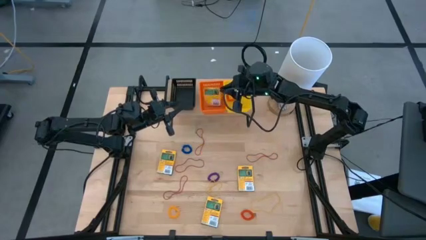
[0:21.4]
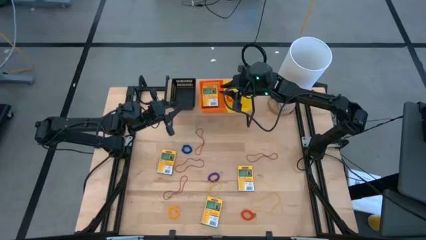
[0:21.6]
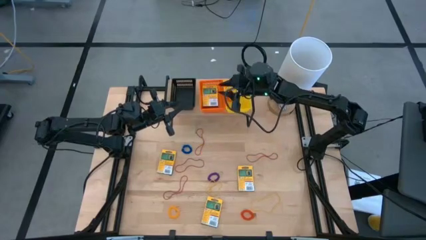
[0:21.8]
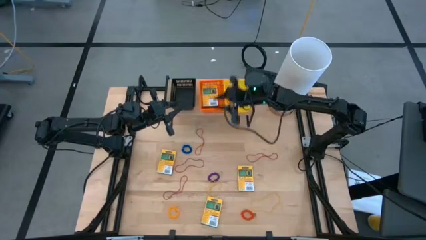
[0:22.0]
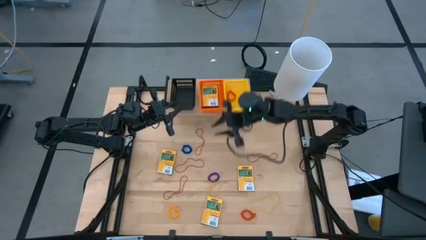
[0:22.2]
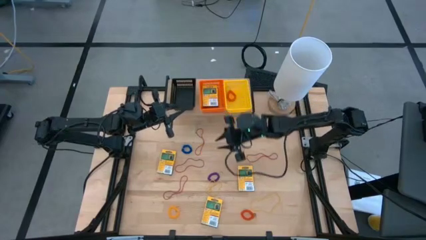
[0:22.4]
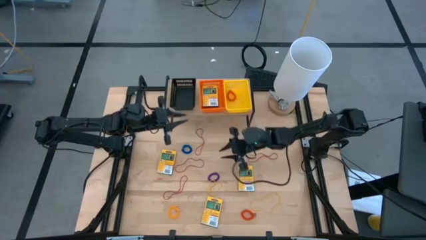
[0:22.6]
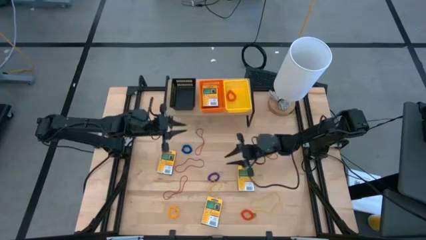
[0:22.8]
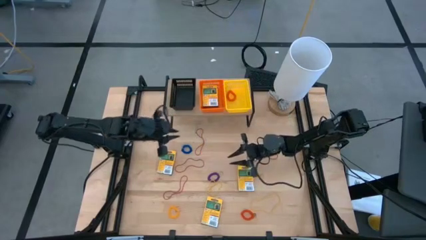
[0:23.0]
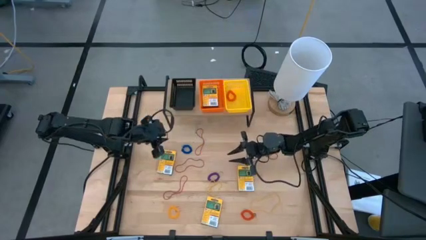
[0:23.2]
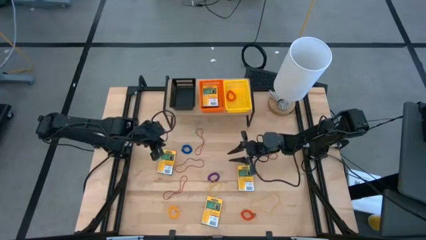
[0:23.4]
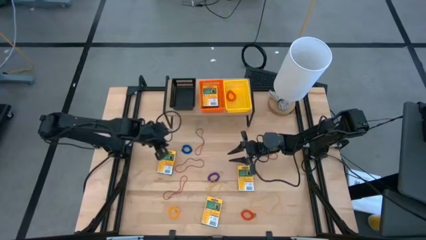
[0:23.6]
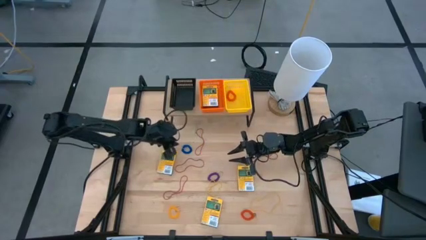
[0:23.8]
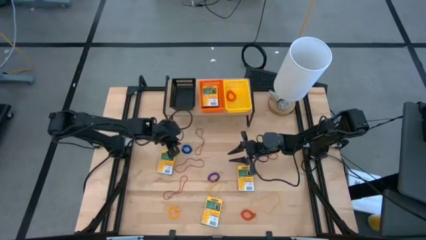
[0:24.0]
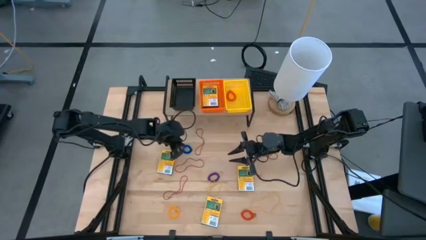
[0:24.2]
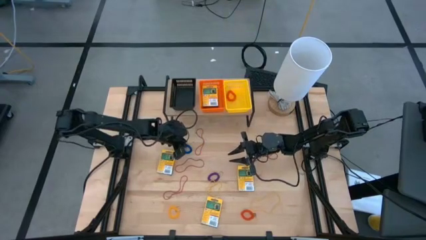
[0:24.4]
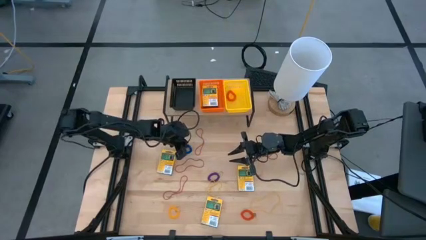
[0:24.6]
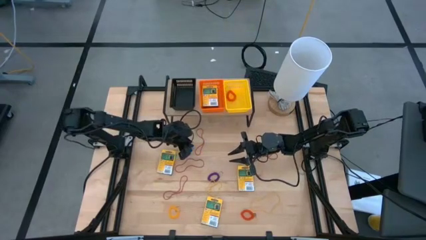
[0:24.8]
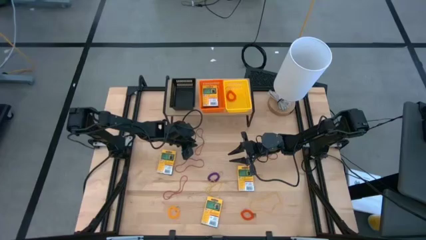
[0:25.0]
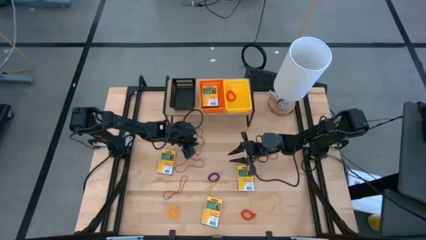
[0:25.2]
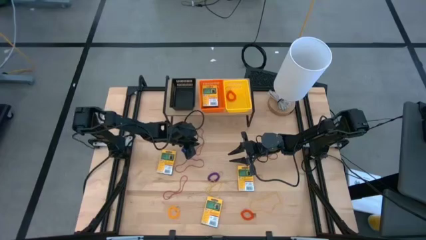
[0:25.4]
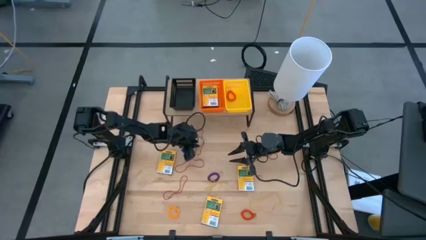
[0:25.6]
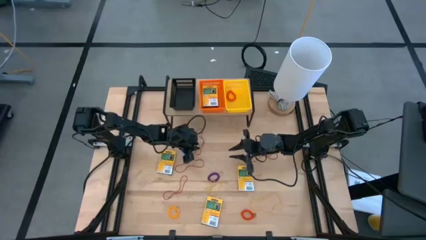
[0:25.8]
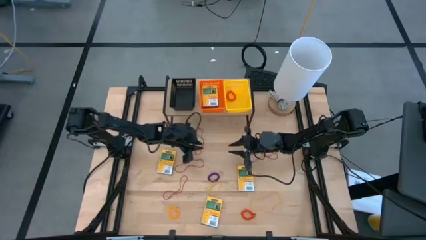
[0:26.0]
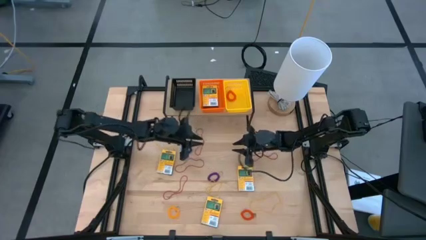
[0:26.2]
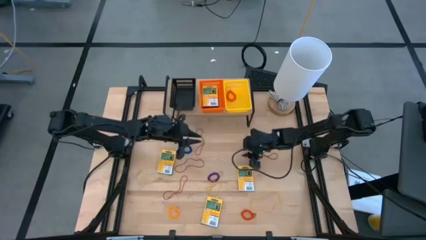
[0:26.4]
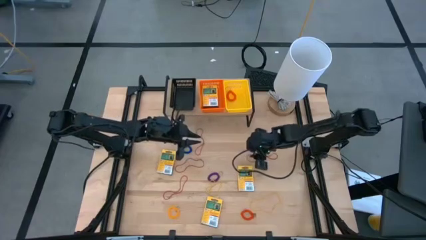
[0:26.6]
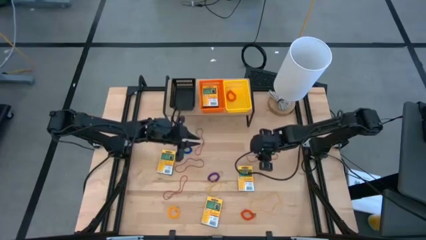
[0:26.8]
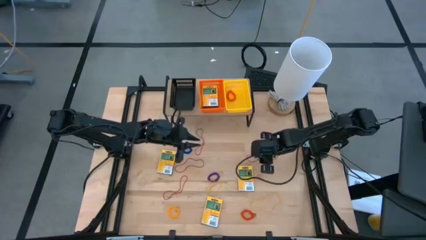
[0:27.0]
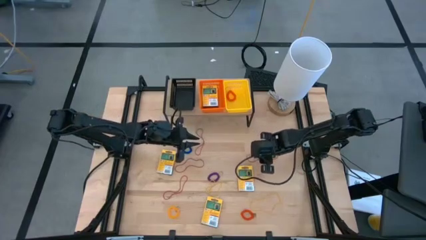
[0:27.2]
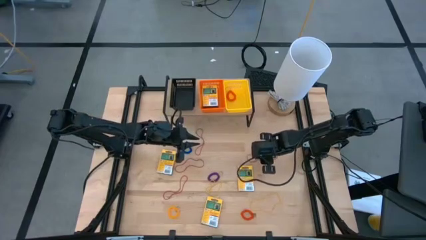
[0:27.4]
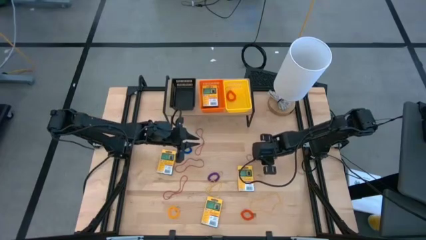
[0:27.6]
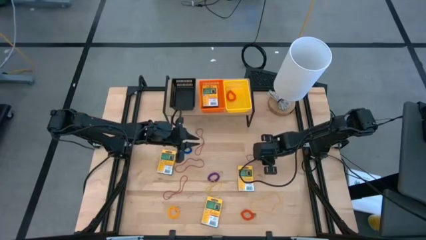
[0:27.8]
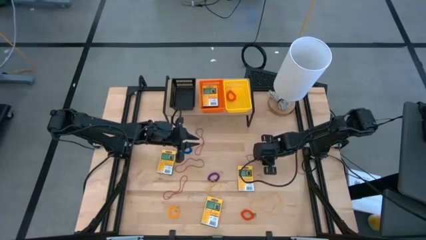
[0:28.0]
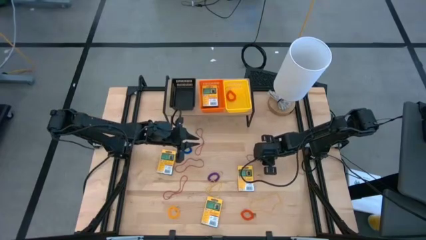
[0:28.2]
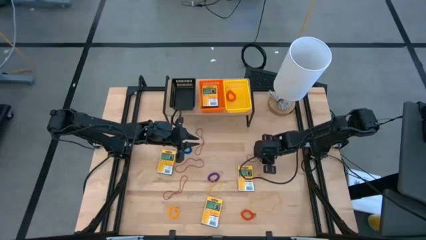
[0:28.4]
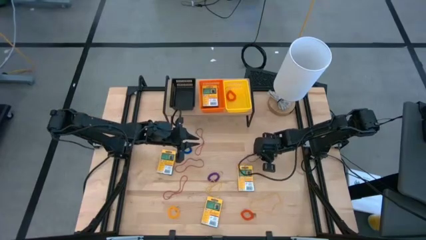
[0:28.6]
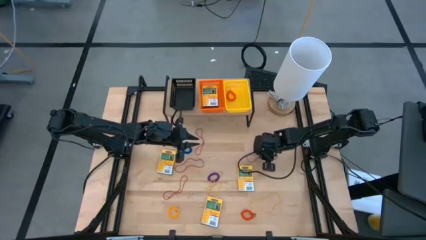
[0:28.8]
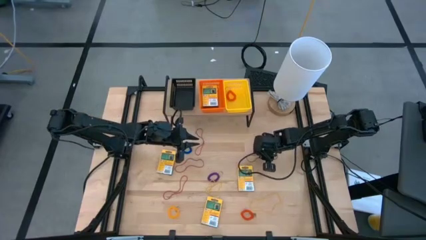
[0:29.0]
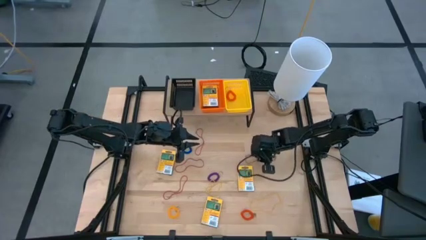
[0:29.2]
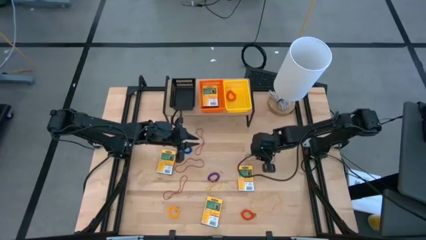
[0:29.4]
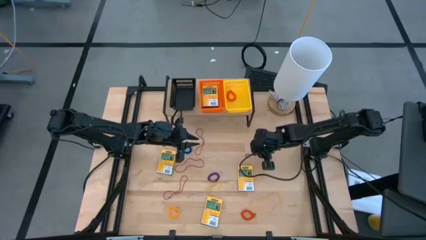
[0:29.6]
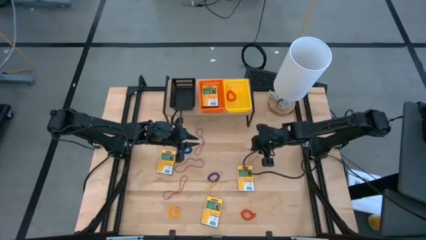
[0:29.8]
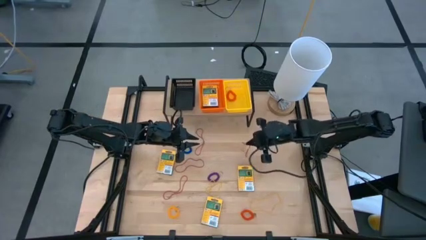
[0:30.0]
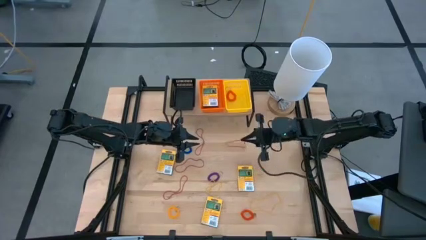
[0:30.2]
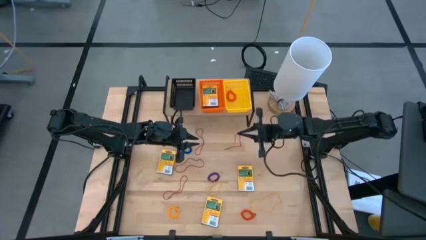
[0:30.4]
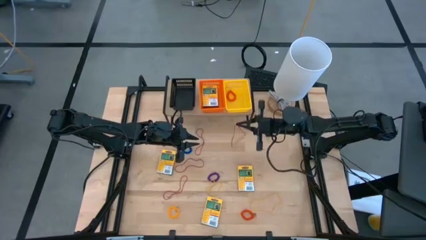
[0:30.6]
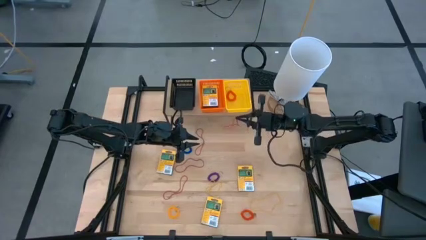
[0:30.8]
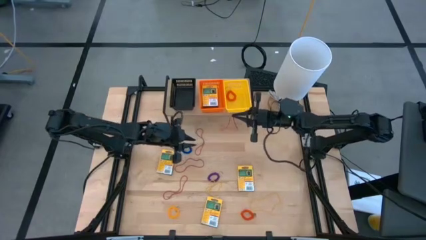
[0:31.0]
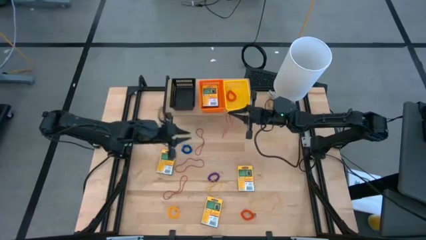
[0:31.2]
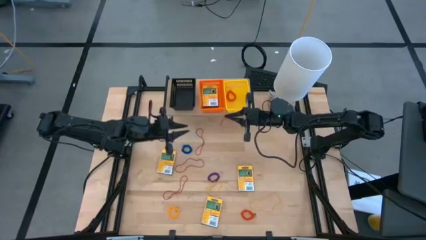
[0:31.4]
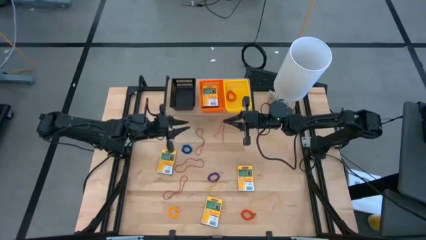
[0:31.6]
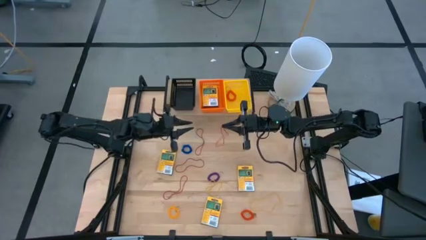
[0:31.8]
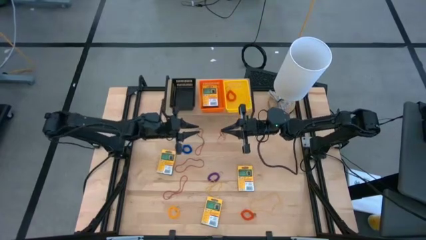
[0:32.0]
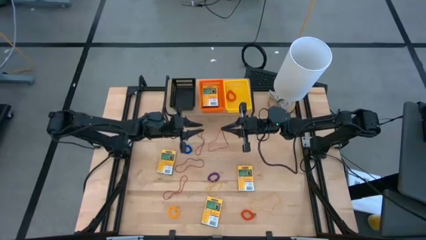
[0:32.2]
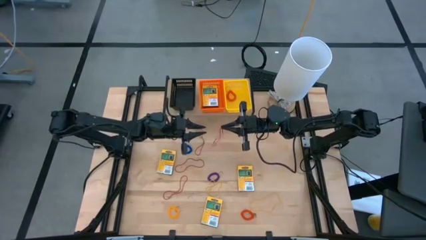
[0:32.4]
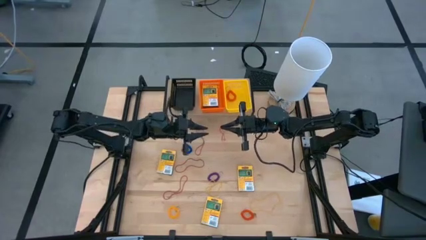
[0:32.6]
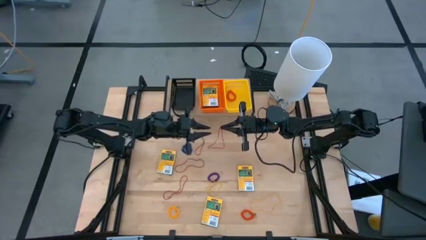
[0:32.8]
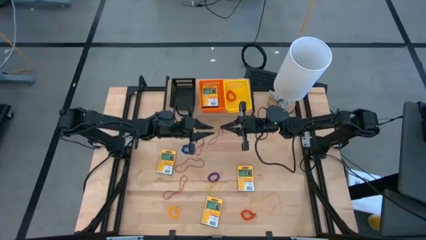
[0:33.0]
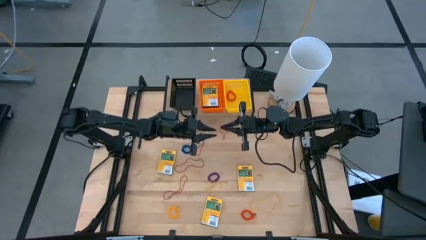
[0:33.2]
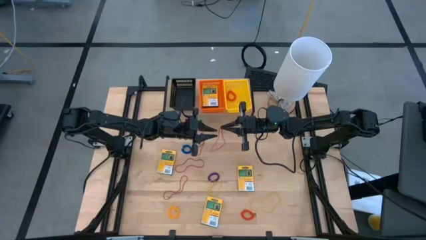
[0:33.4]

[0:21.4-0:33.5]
Task: Pick & Place Office Desk Supplies
Put the red rubberband into the black bin on the shelf
